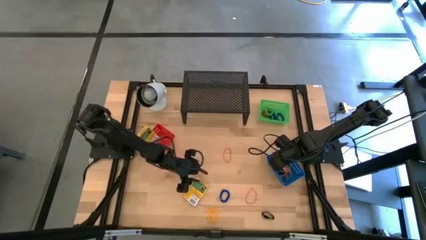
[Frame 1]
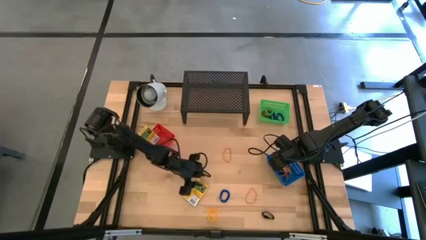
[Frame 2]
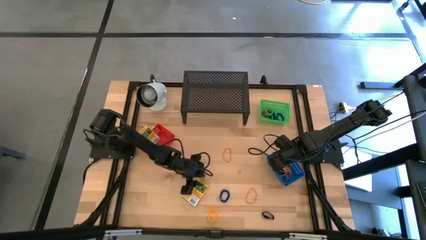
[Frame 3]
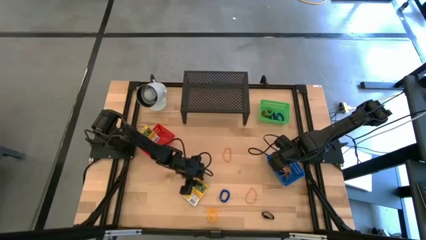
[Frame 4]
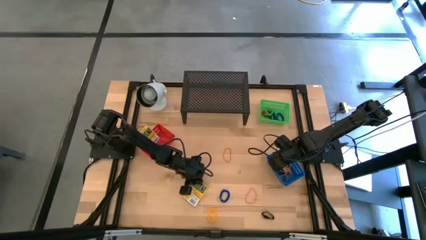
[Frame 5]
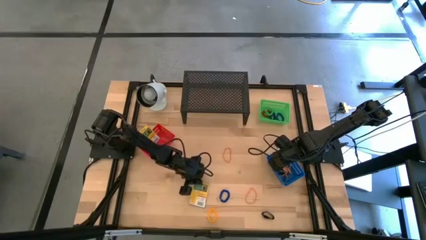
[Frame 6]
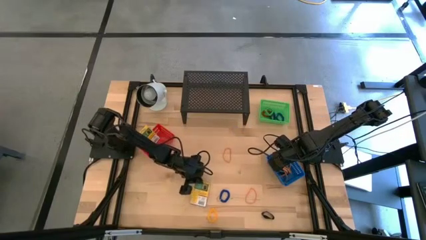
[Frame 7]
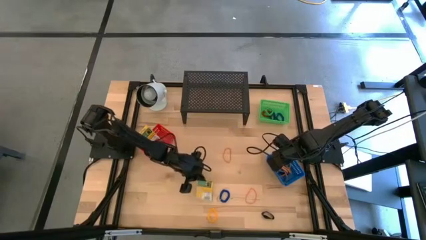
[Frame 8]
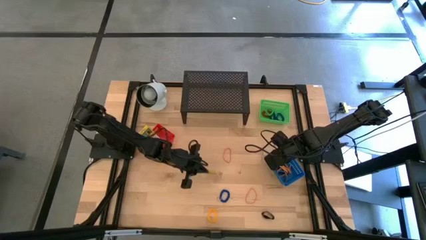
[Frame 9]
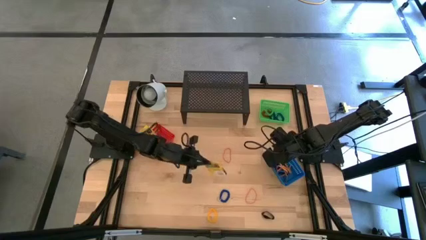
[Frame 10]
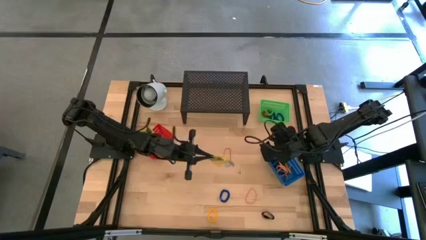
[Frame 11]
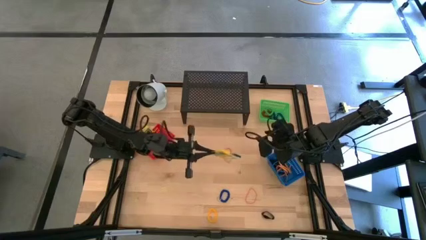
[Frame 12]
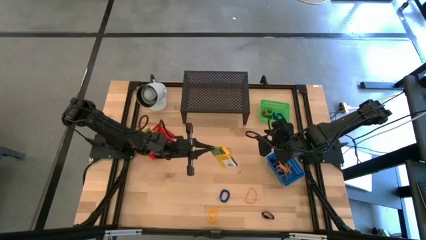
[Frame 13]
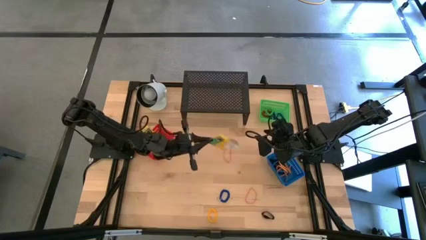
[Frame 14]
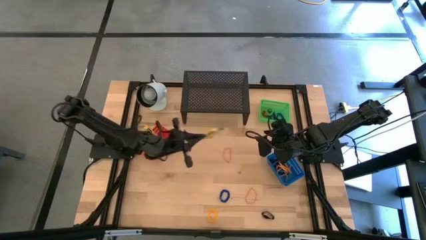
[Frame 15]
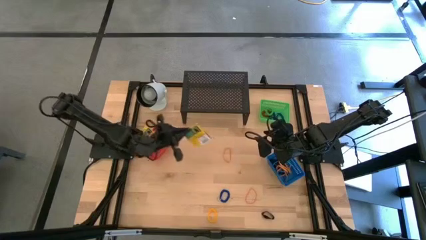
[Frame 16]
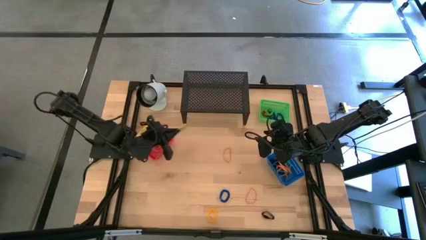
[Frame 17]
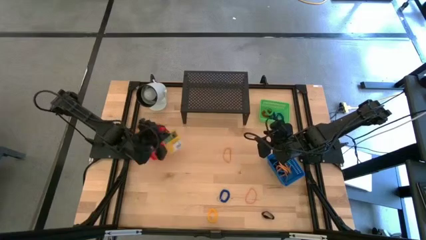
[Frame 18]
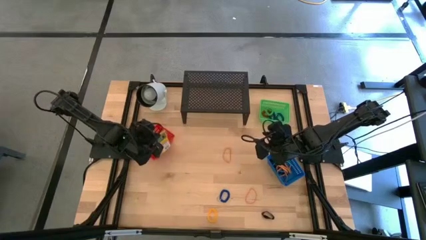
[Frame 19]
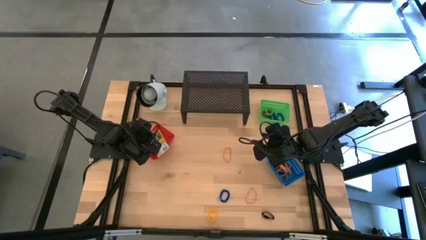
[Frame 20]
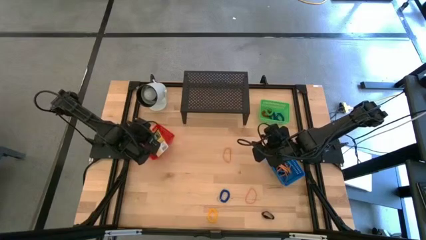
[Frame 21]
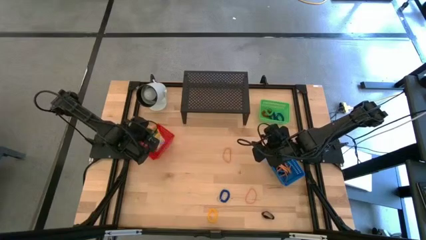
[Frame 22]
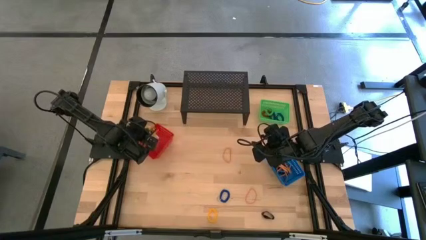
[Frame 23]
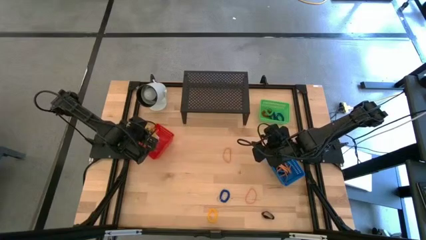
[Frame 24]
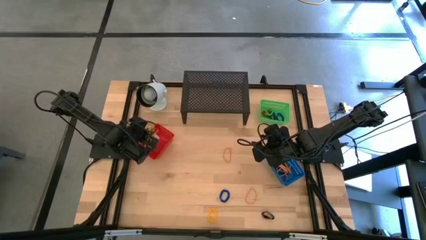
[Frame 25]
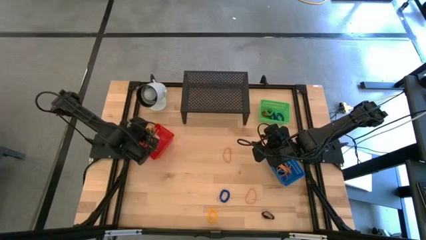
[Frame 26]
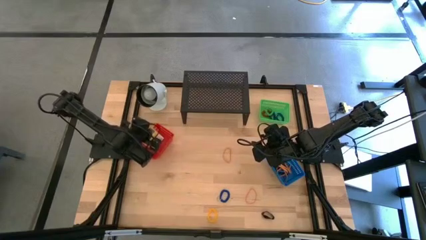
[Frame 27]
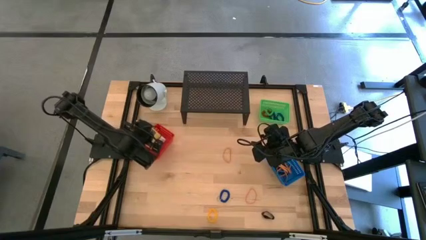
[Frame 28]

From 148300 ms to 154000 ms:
Task: Pick & Place Office Desk Supplies
Put the yellow crayon box into the red bin

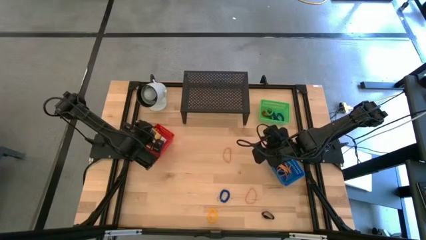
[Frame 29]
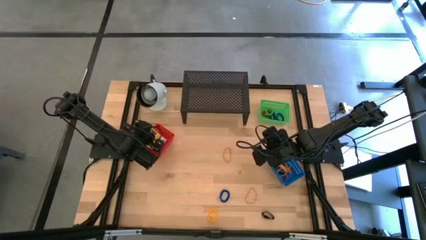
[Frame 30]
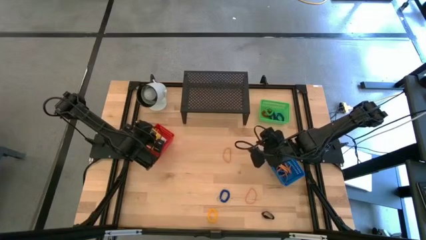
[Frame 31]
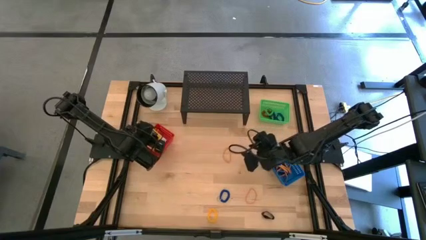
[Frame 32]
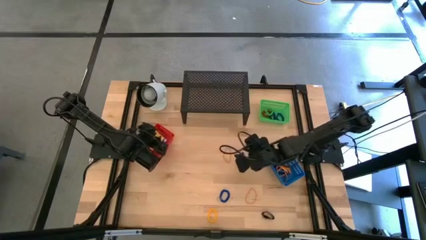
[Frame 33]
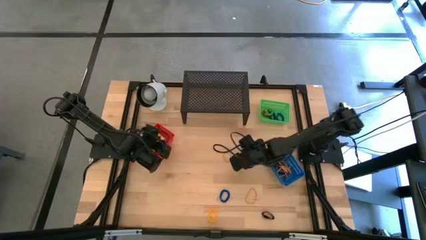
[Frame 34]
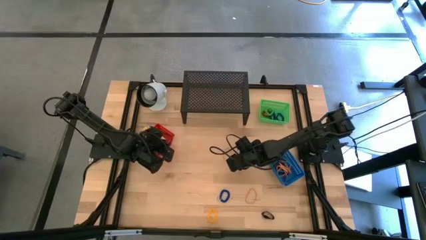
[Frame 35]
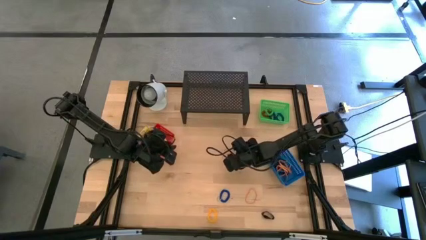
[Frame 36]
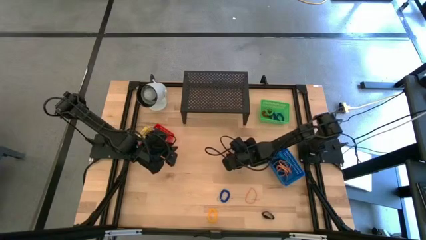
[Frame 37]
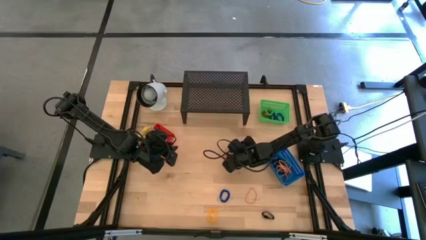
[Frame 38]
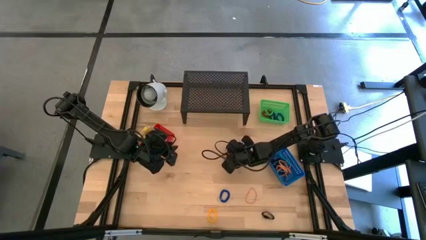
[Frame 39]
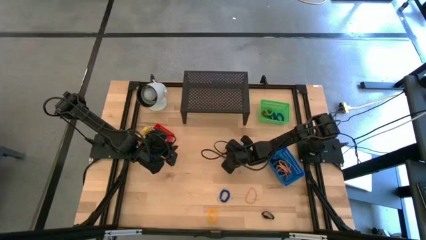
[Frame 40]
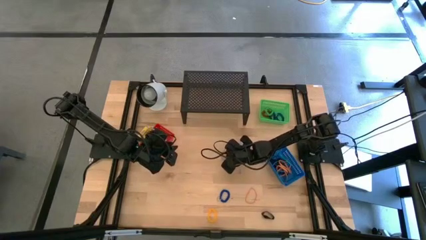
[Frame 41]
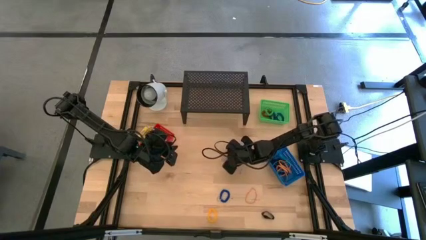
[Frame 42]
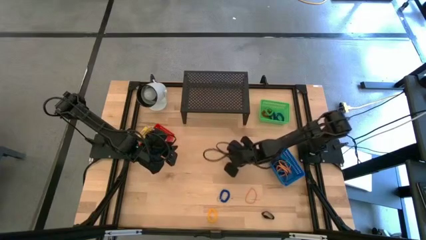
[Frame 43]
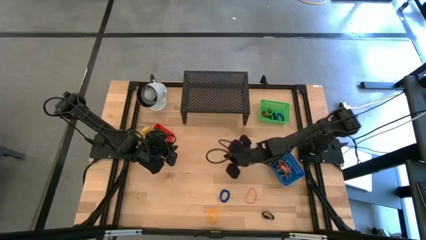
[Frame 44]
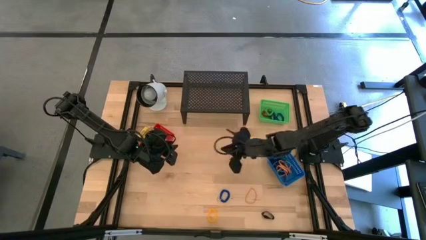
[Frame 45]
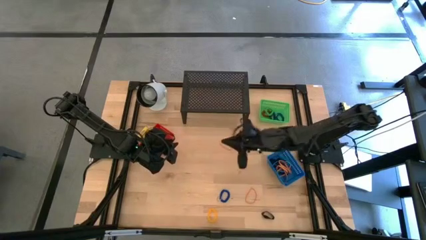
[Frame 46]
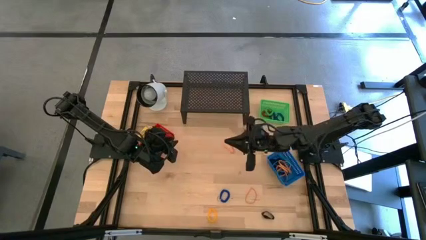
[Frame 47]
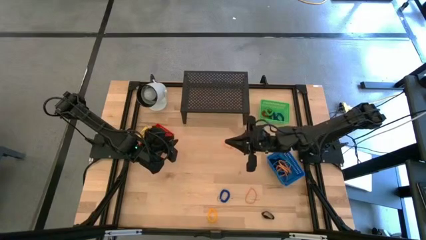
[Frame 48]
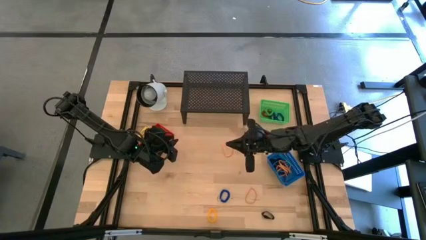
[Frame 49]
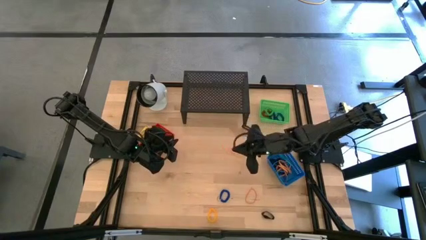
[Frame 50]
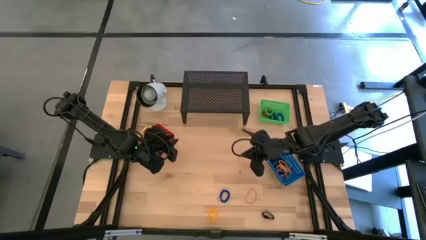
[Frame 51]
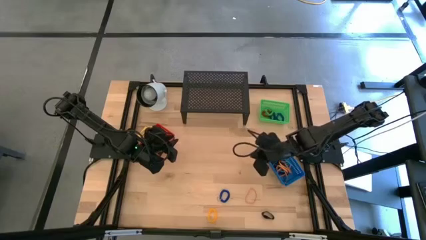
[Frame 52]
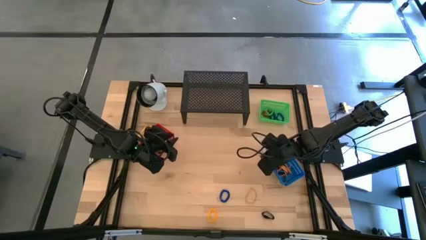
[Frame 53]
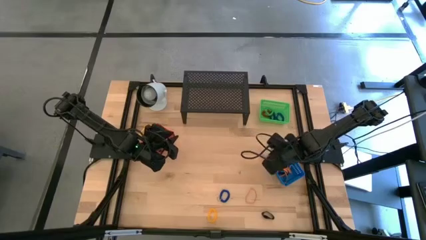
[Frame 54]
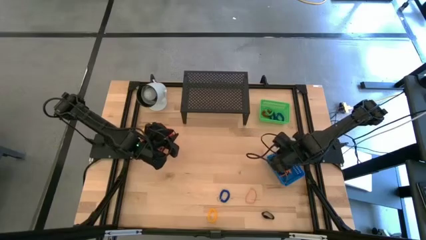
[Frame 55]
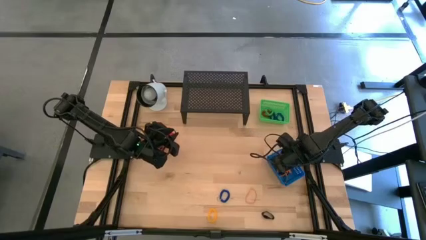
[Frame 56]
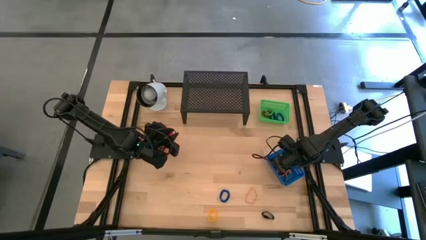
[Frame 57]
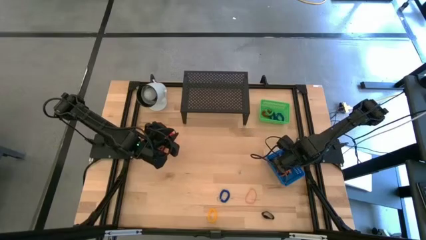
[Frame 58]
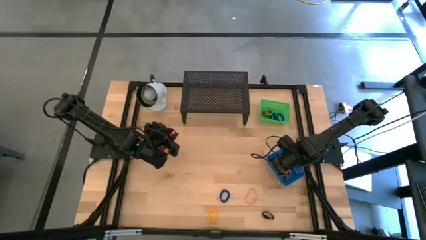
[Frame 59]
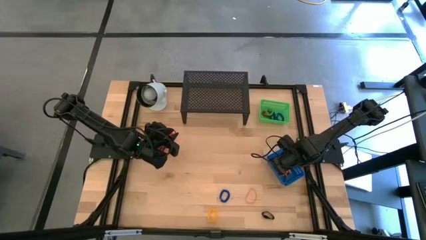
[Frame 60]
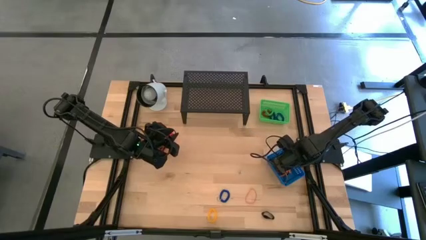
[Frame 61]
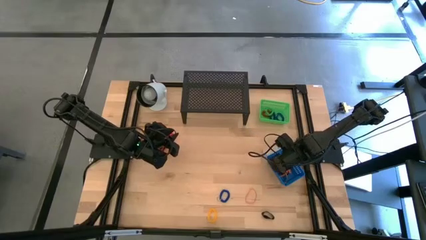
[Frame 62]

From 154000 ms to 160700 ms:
Put the orange rubber band into the blue bin

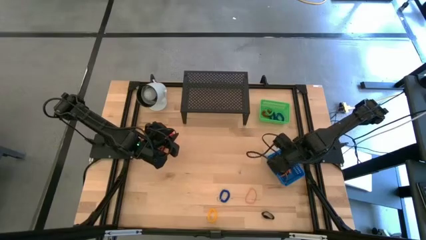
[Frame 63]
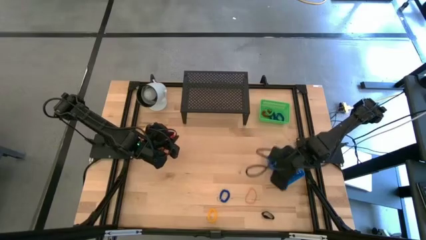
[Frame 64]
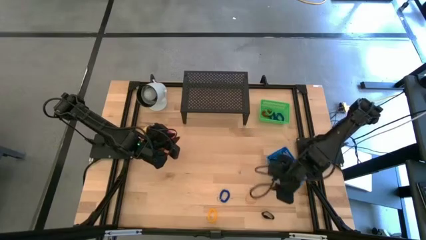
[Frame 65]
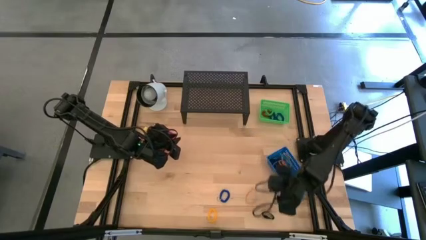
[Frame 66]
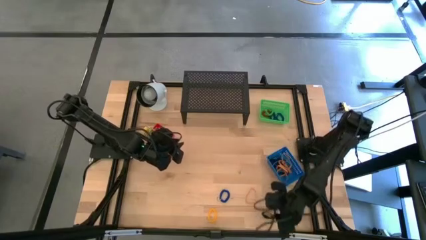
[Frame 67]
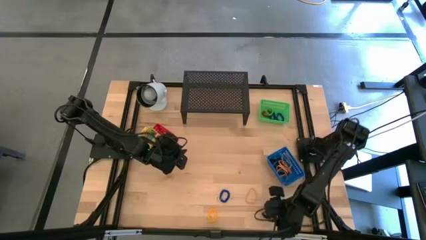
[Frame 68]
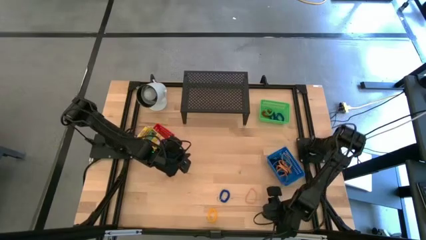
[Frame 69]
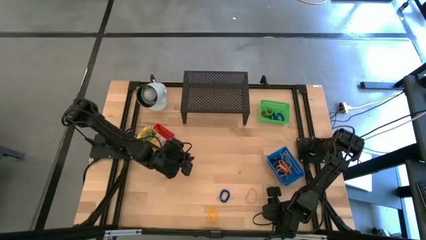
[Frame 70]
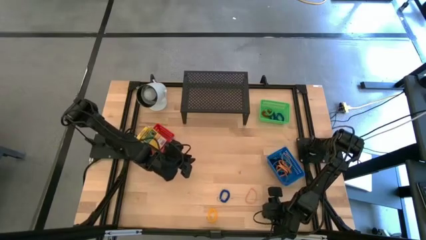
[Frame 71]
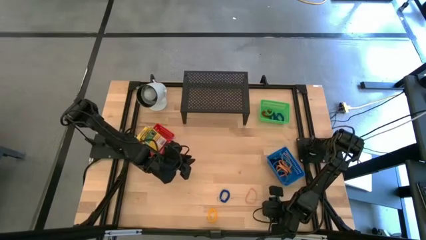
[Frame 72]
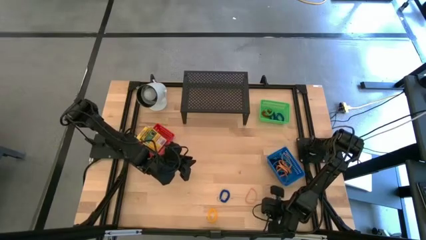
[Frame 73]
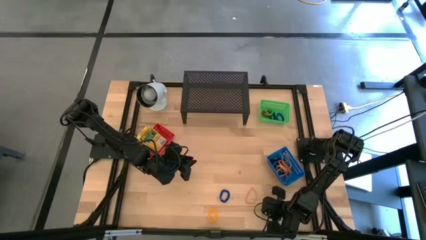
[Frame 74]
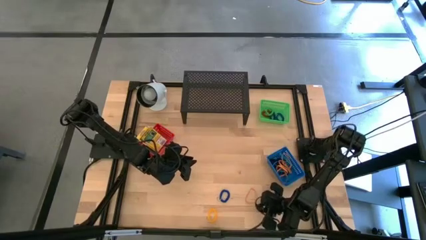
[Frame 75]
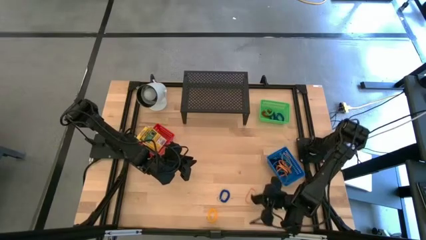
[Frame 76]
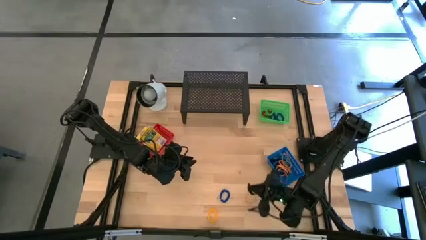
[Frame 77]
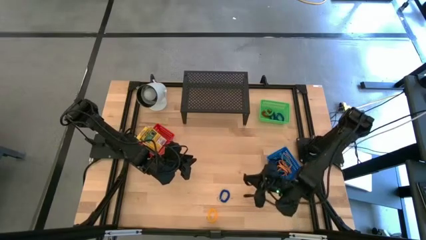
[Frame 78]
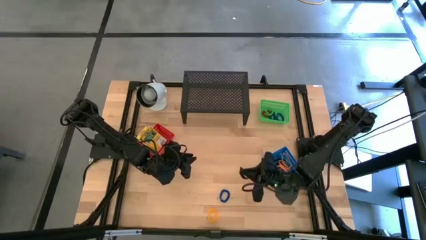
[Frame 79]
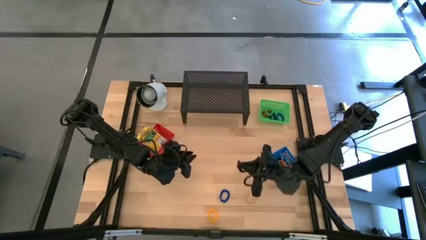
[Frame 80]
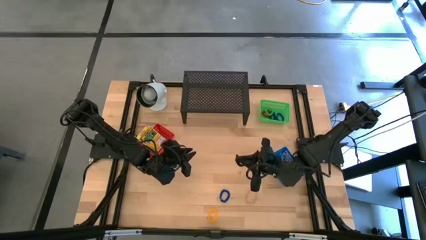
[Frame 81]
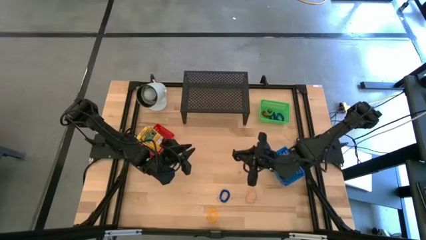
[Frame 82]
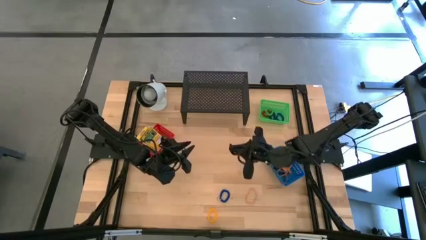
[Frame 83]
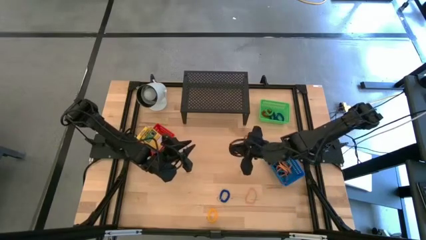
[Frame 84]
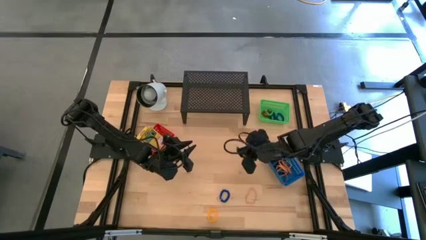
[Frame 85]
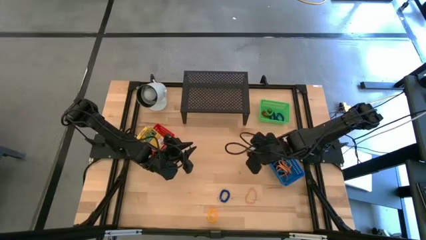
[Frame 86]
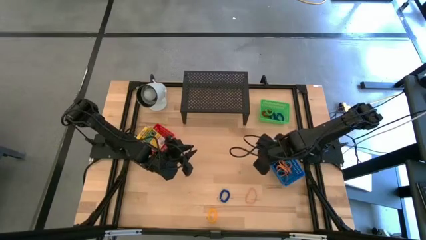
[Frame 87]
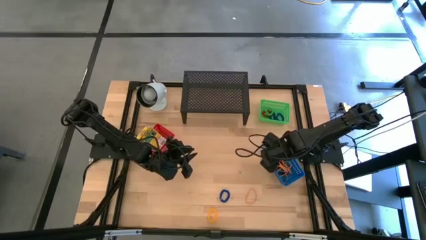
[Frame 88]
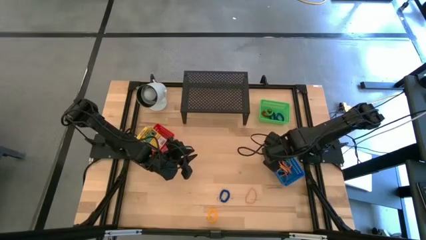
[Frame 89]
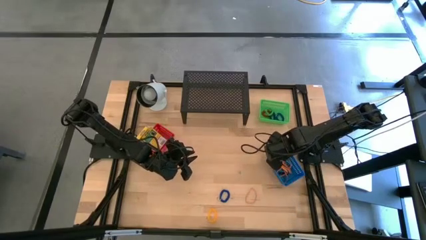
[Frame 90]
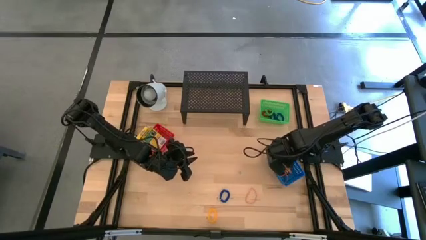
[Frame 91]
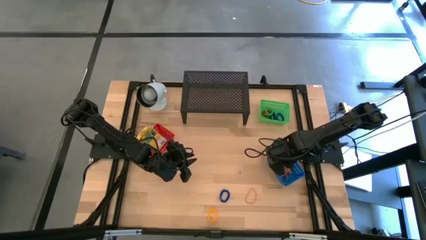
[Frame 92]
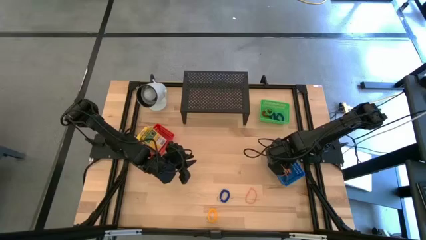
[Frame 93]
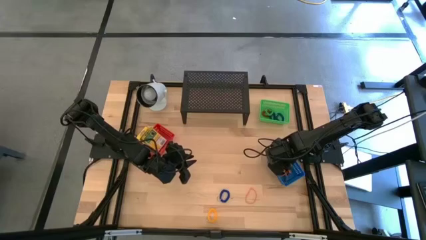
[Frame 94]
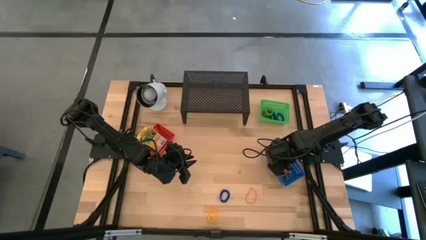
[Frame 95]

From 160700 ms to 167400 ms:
Put the black rubber band into the blue bin
